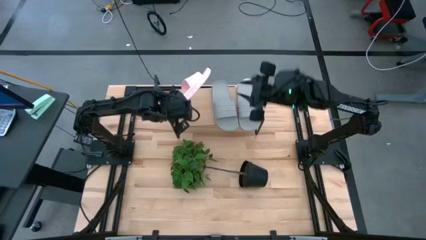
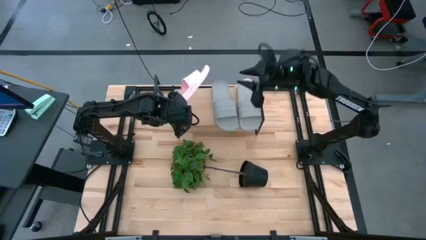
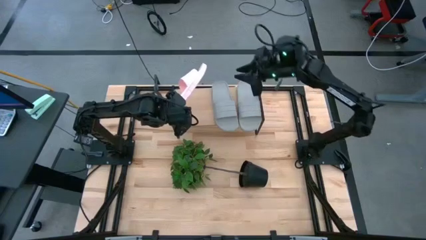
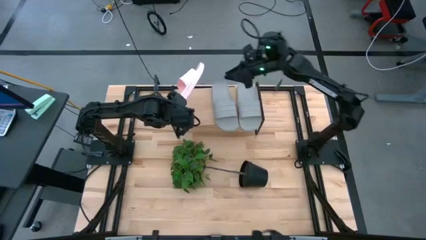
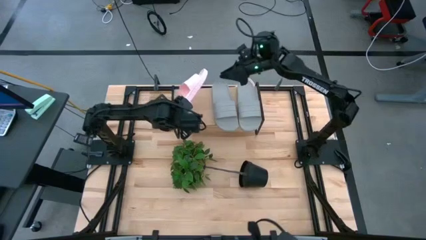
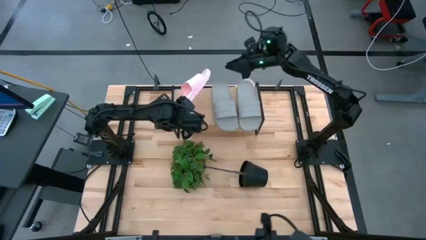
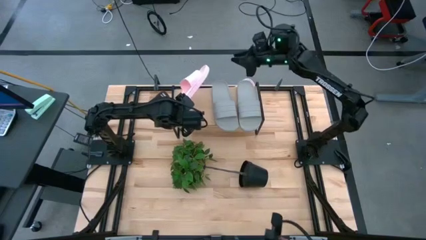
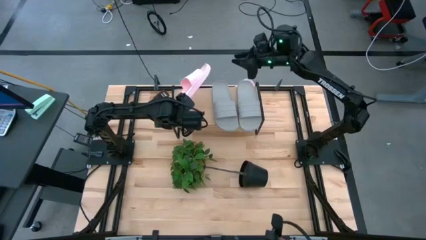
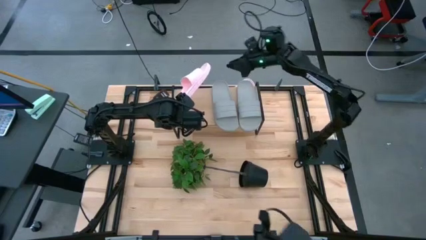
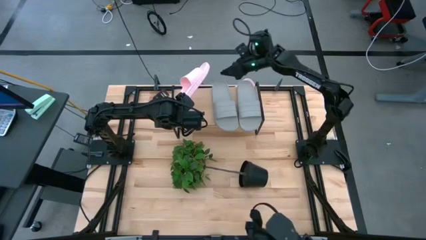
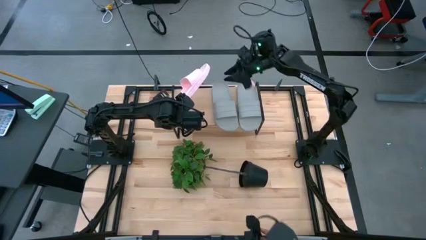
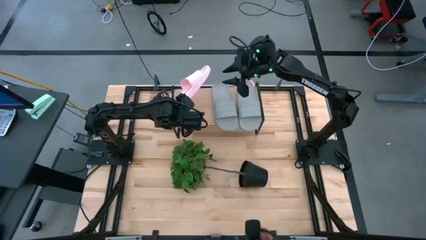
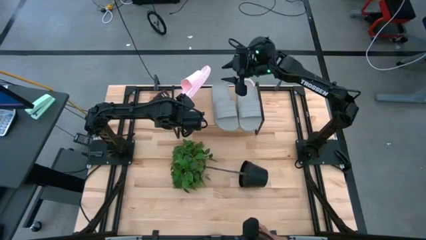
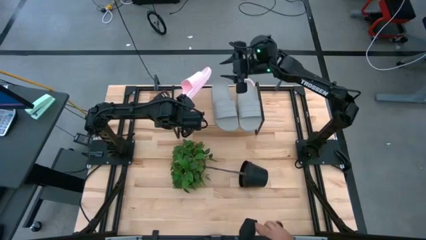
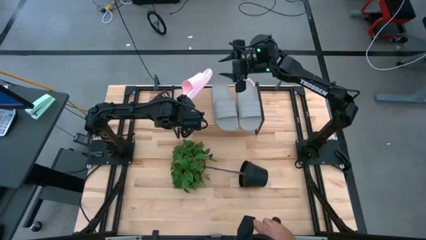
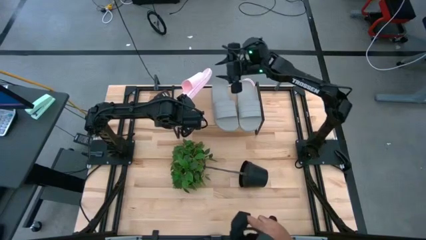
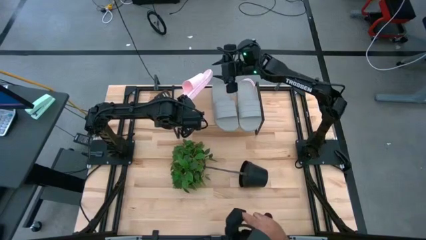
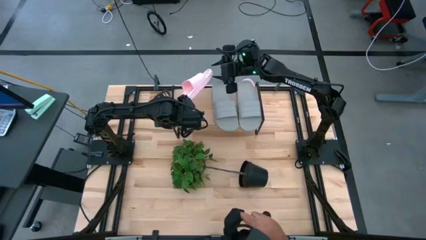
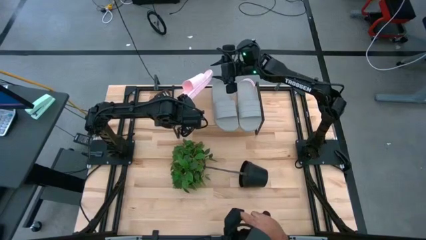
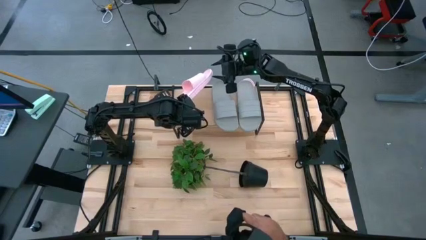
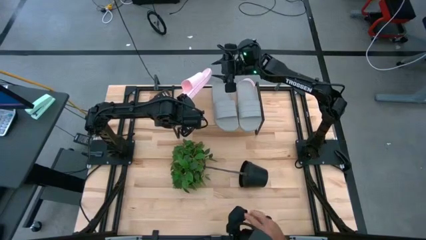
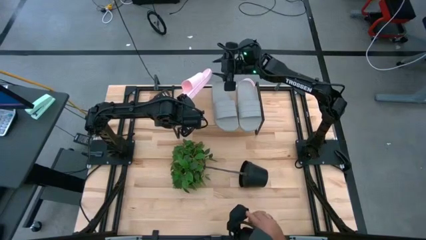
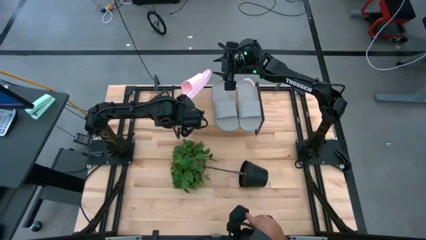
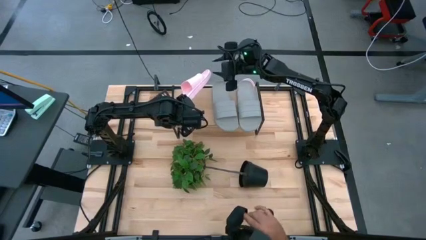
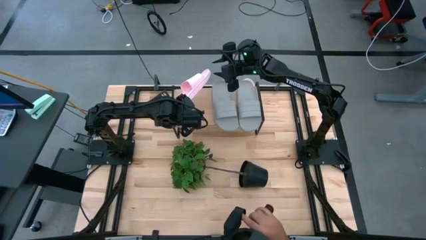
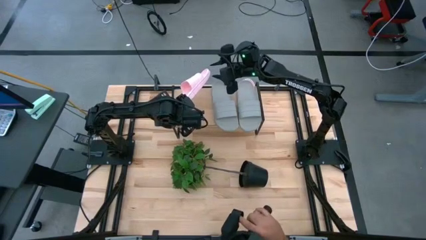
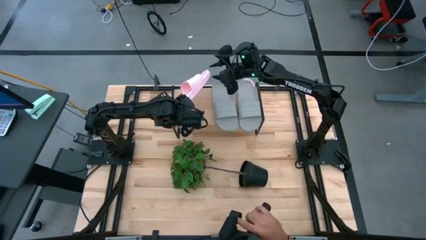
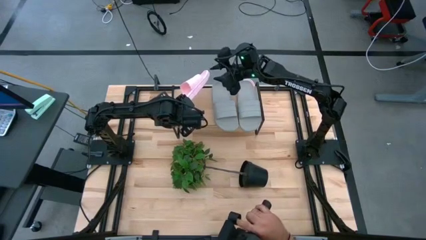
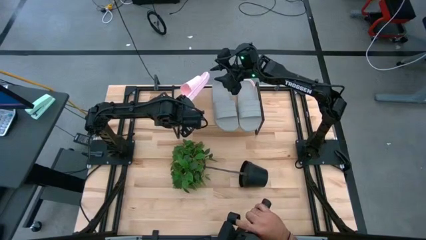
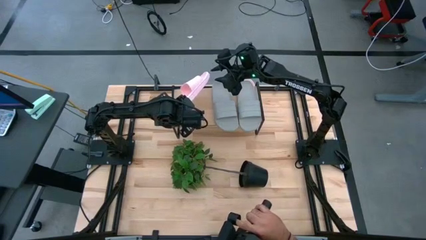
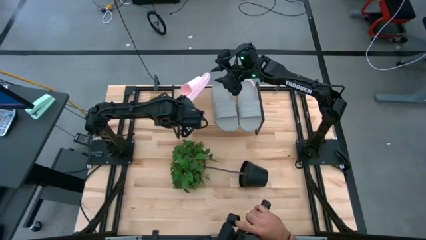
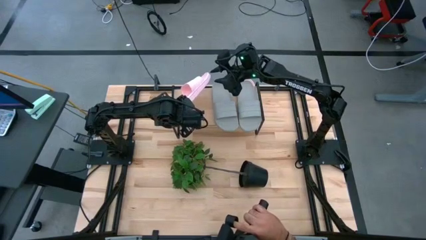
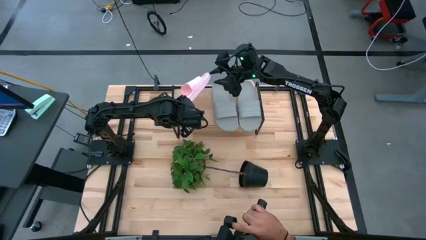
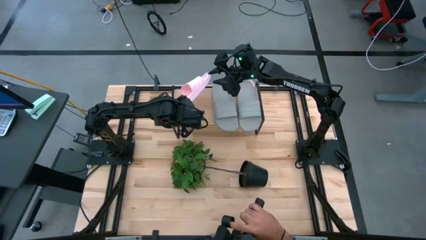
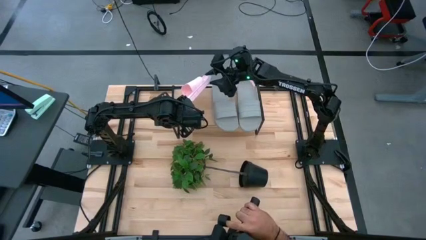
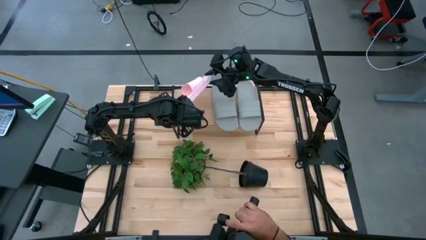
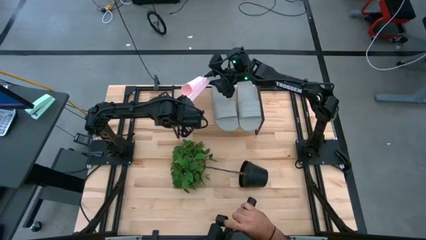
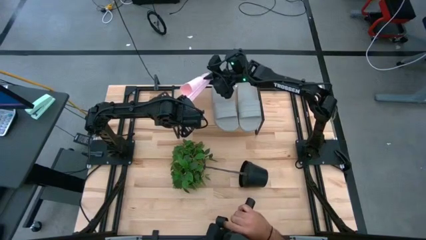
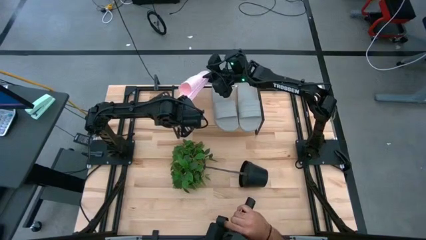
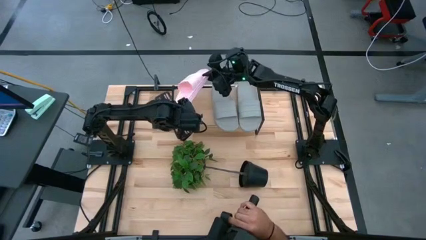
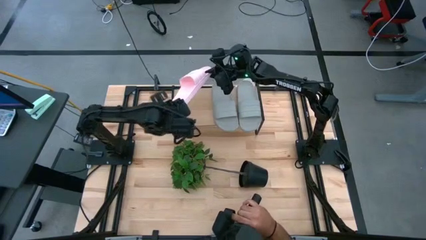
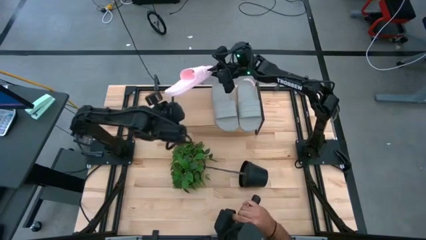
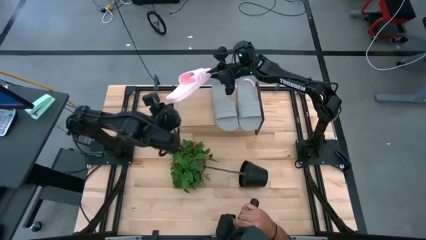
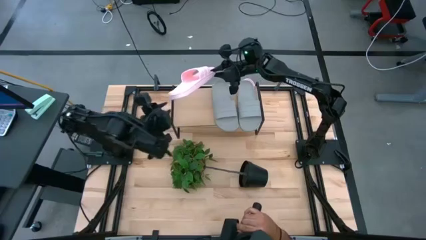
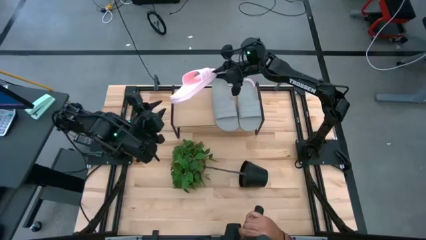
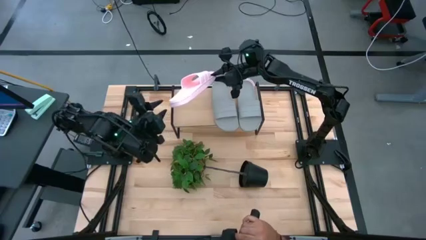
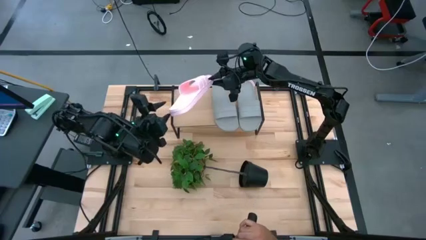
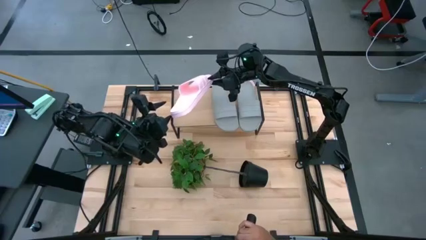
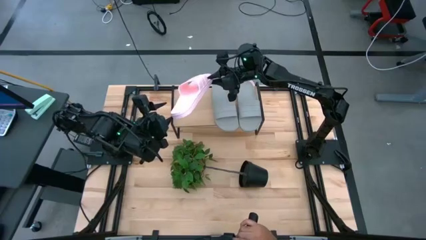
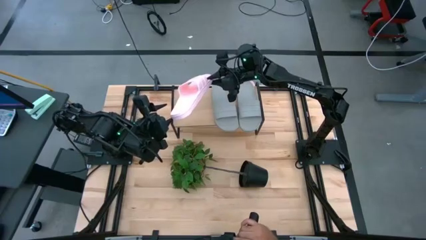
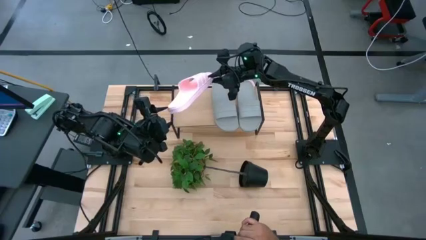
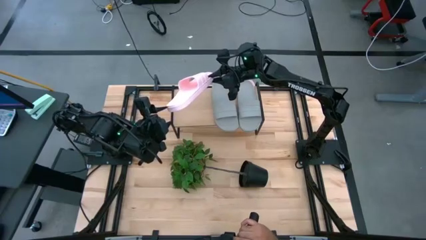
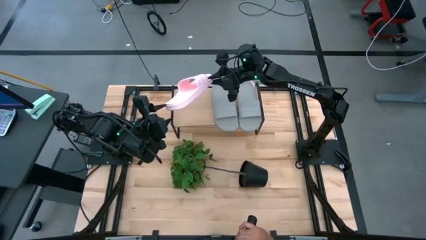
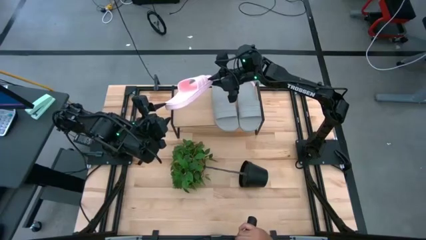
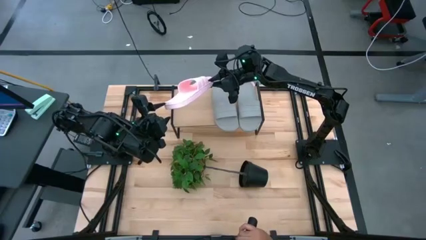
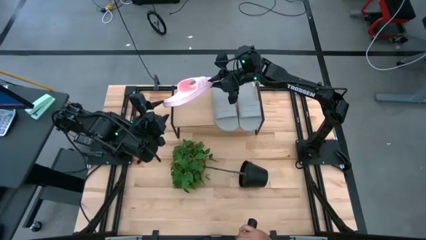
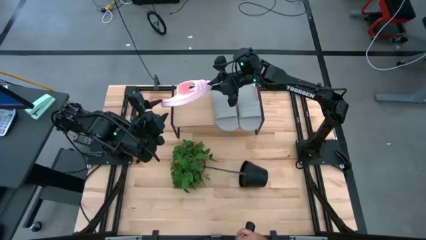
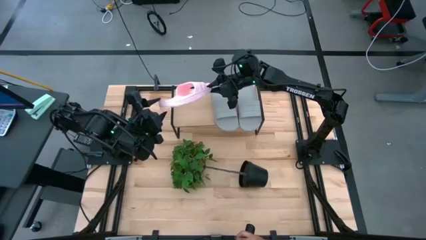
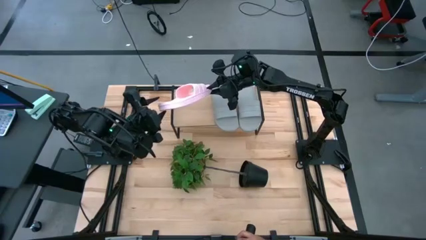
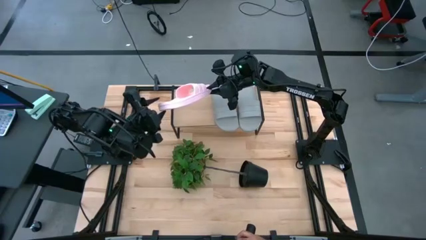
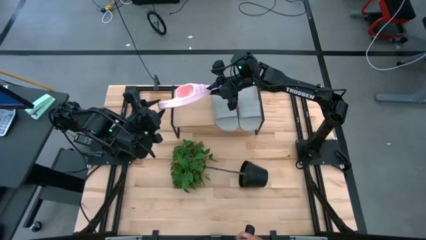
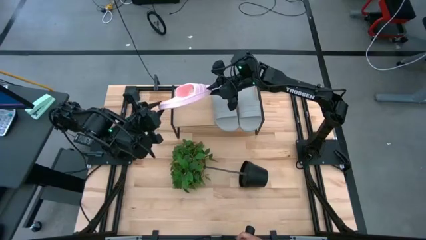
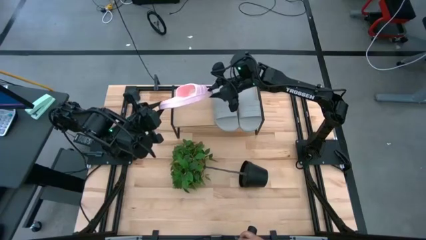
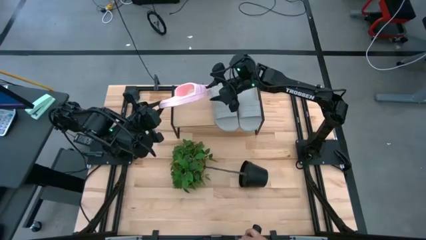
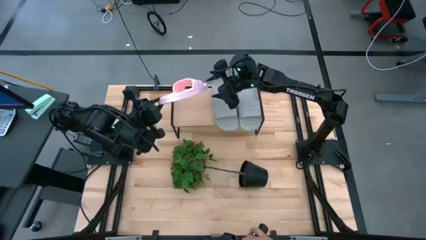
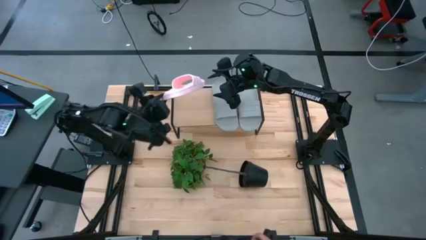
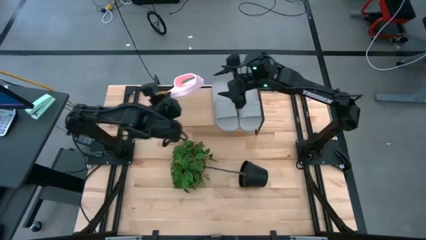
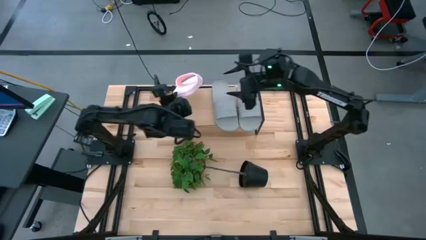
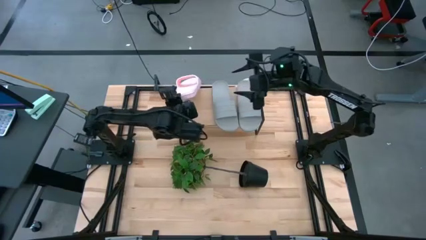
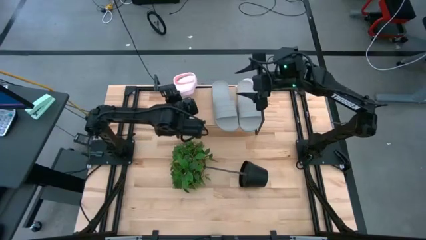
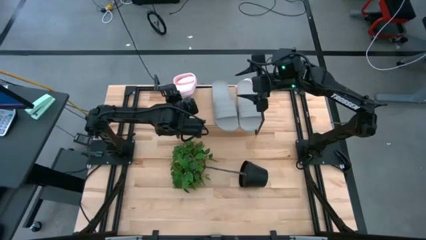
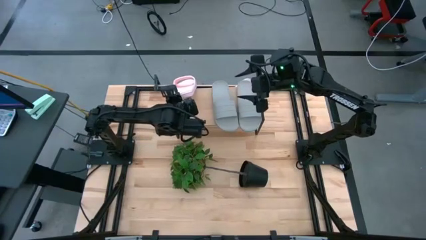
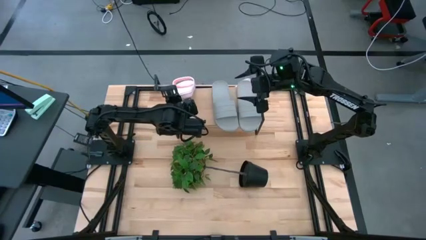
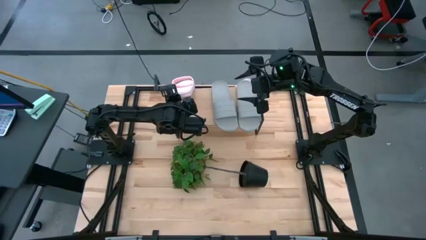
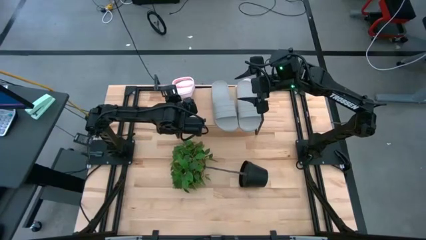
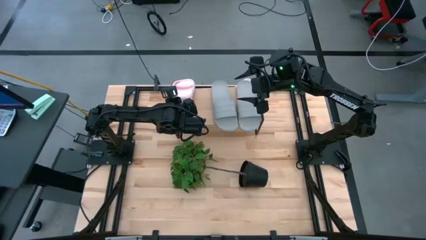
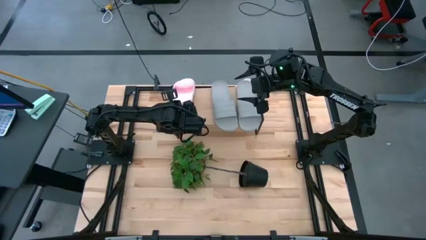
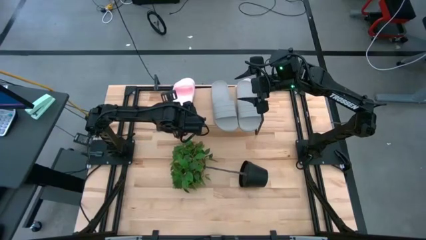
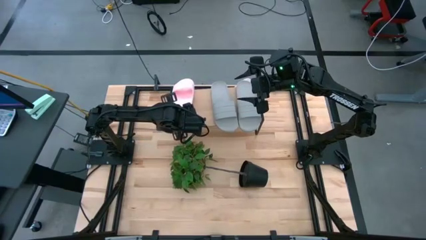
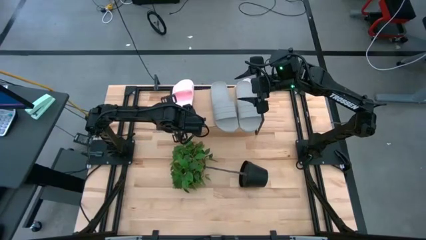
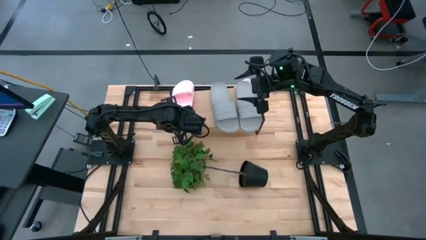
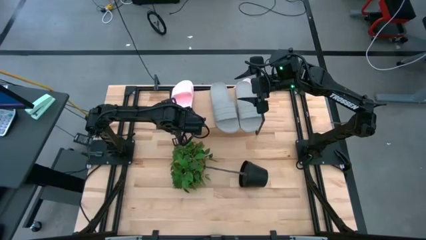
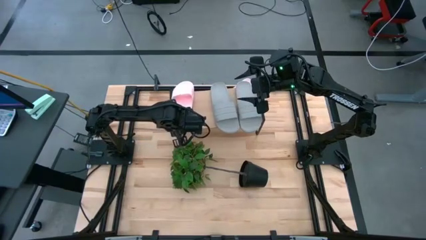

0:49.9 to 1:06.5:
Task: Pick and place slides into the shelf
Put the bottom pink slide on the shelf
